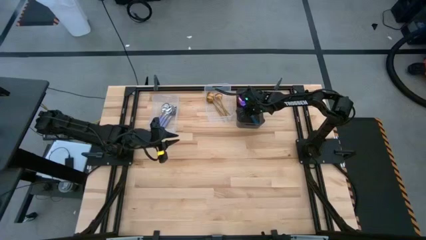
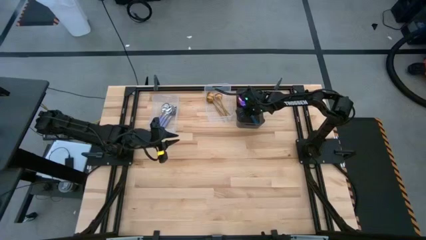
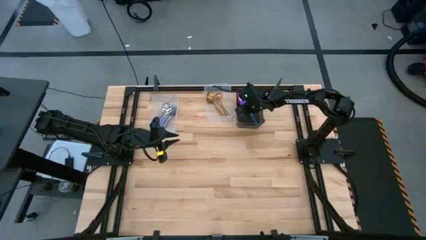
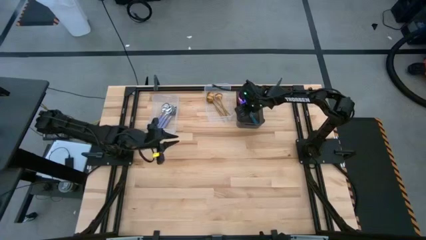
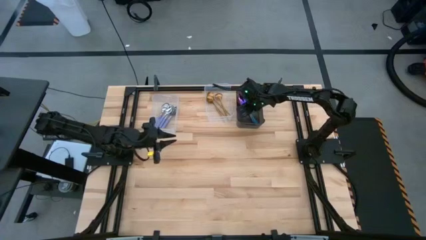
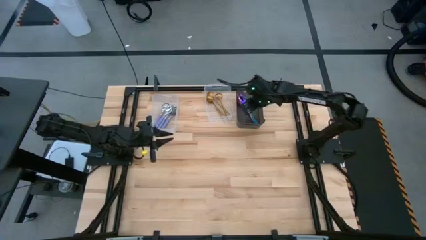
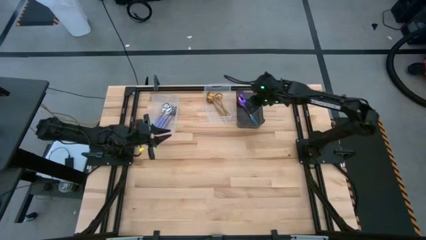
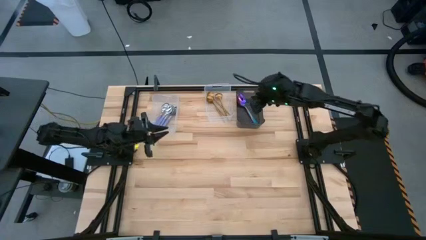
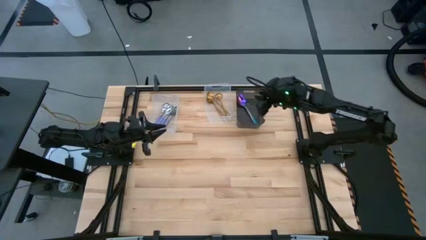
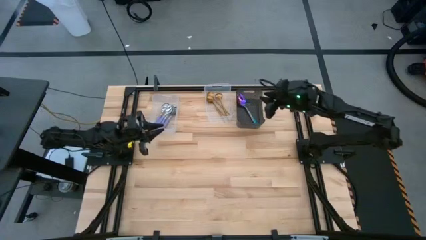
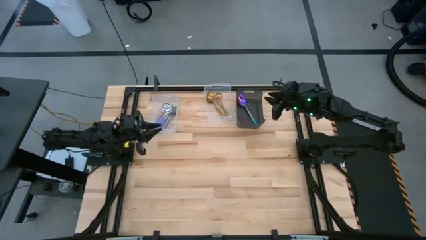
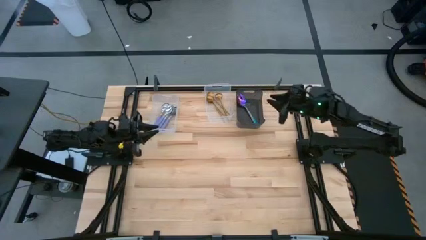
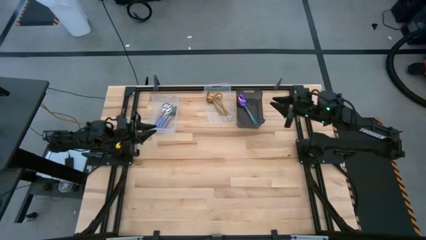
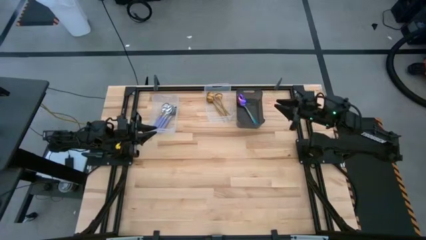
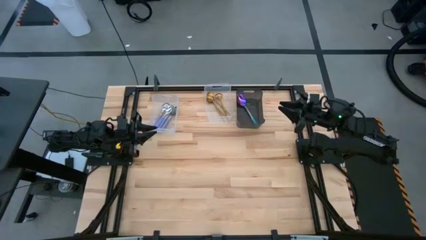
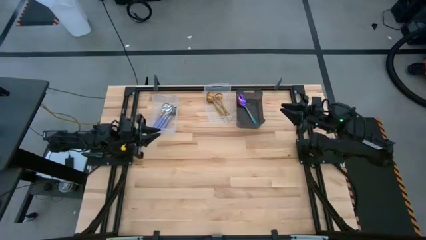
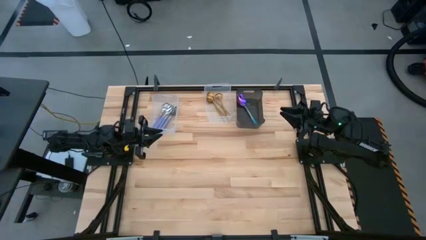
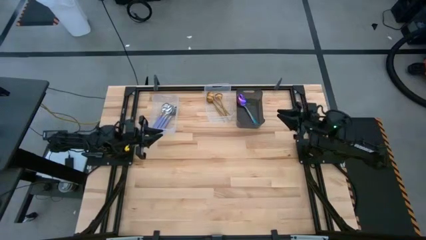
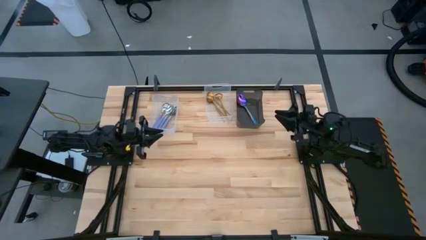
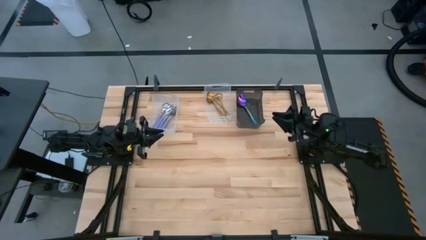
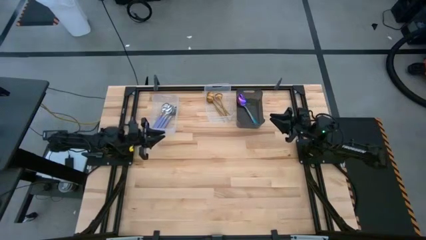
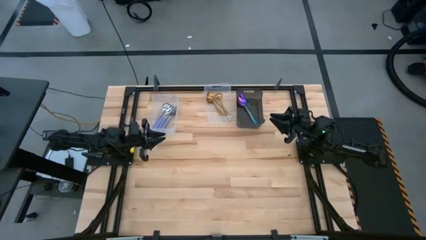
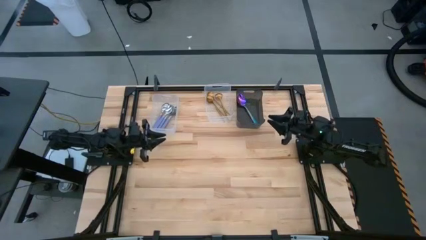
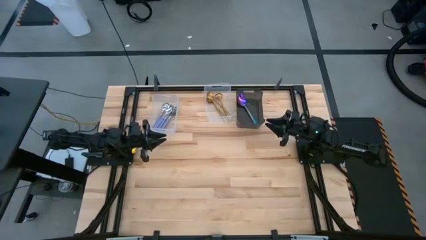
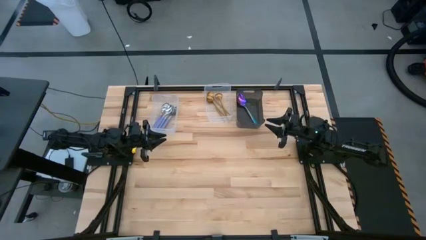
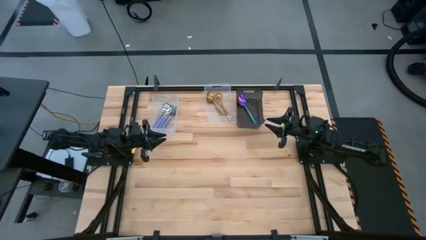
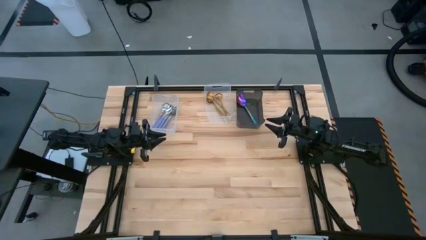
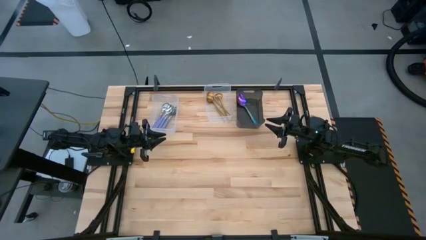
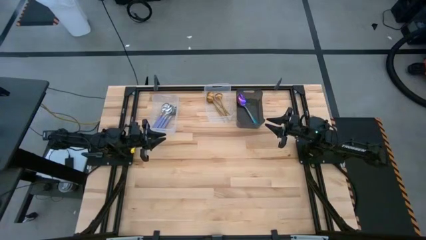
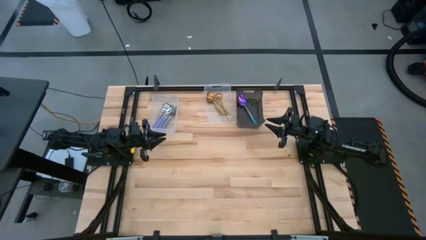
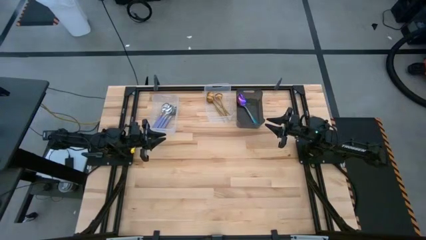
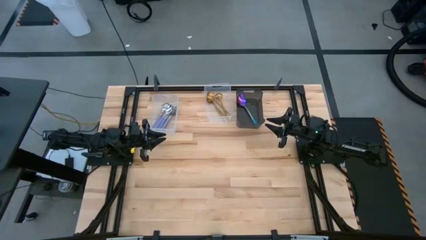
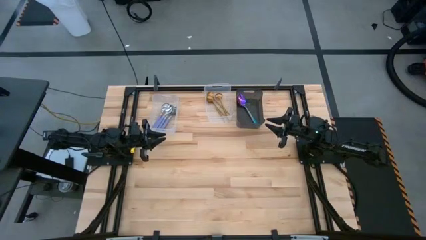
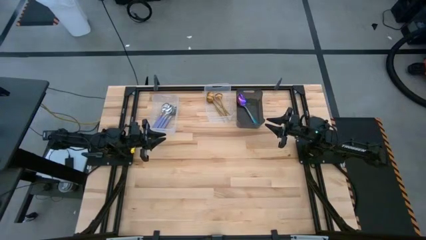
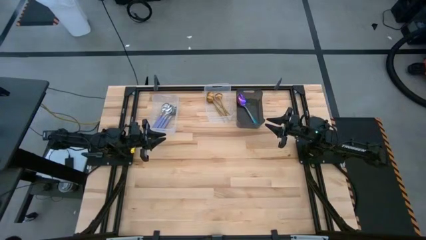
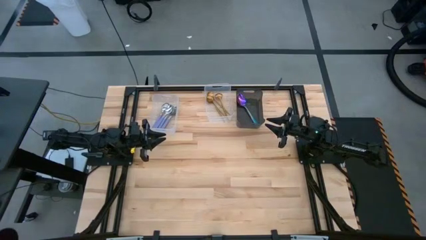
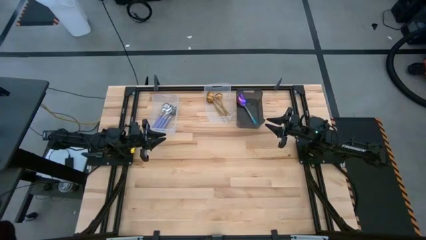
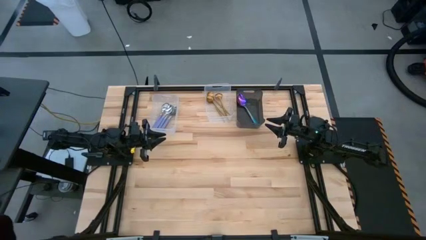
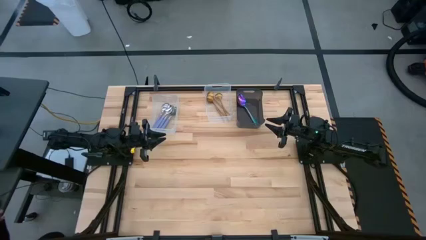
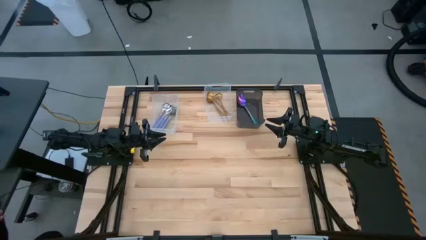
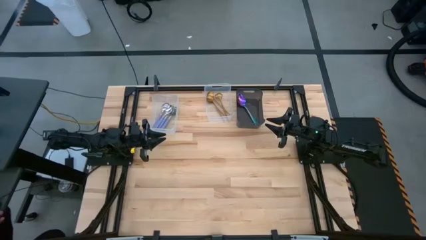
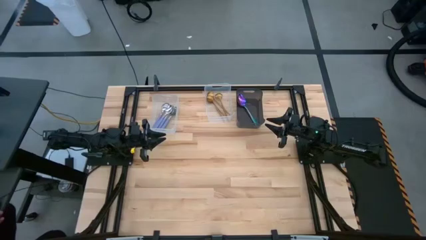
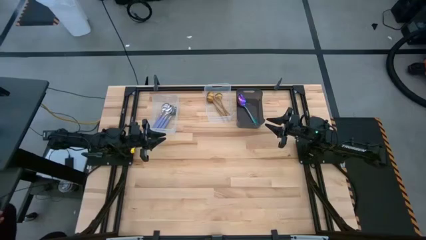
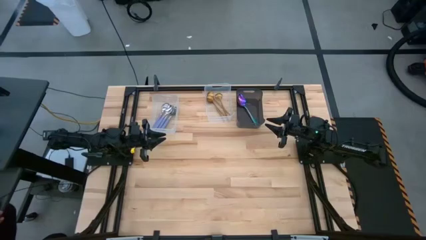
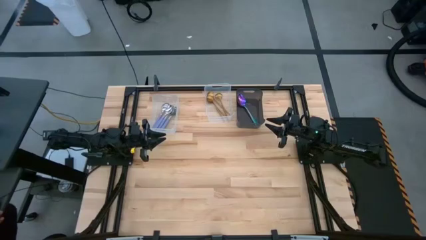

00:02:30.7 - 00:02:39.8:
Task: Sort silverware by color (type)
Return to Home Position

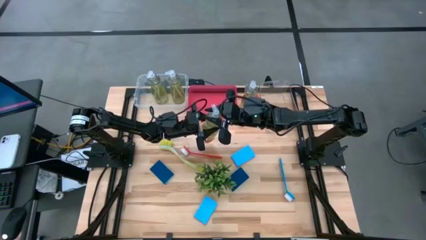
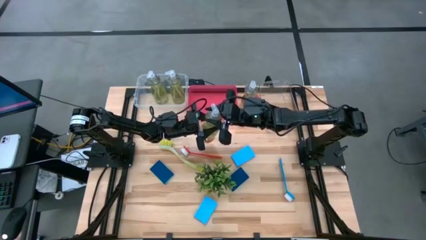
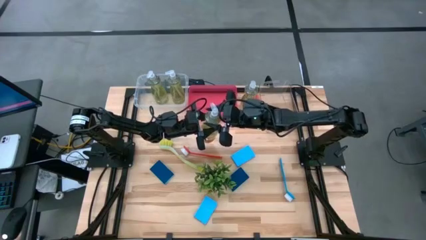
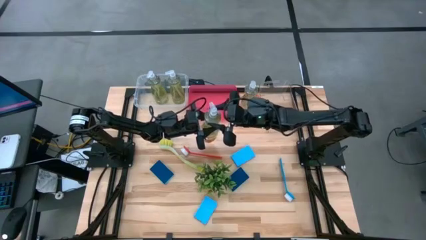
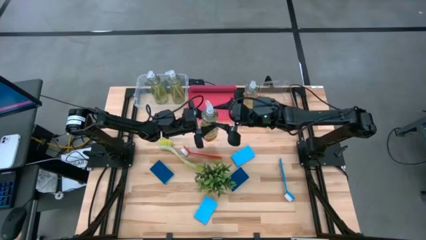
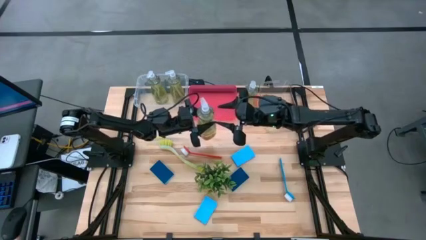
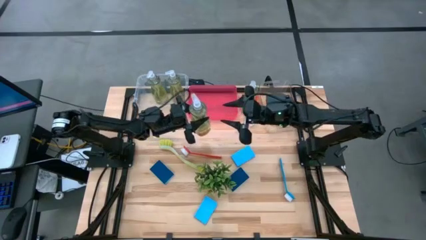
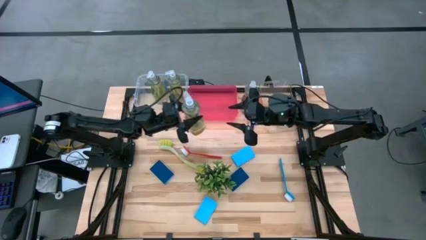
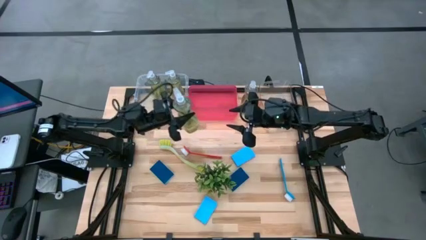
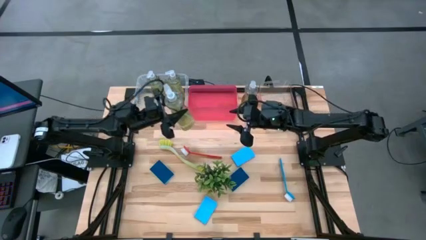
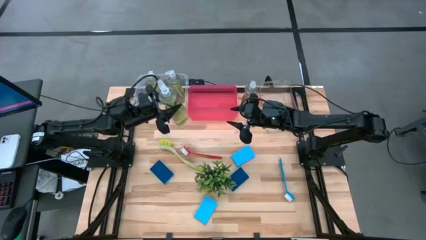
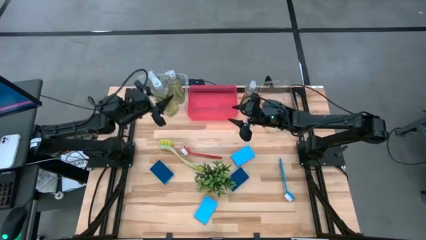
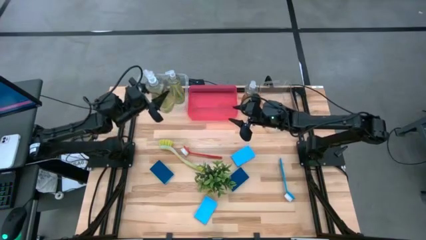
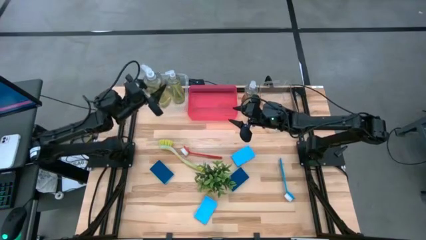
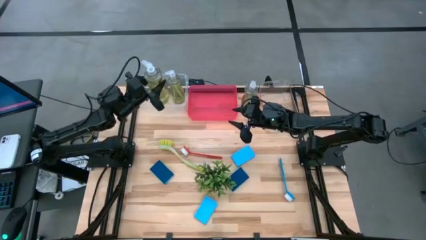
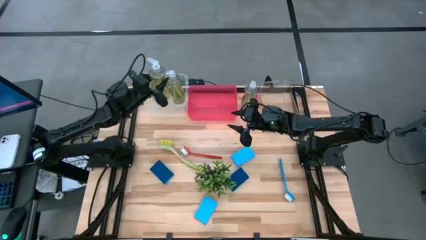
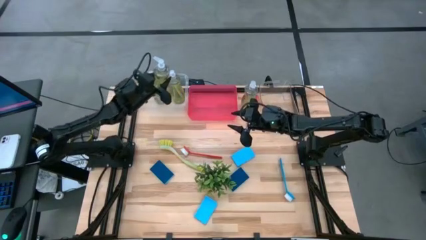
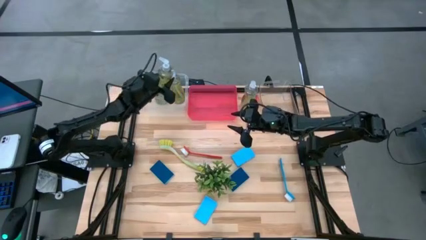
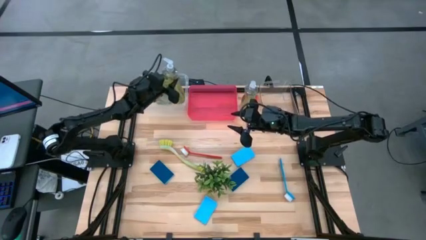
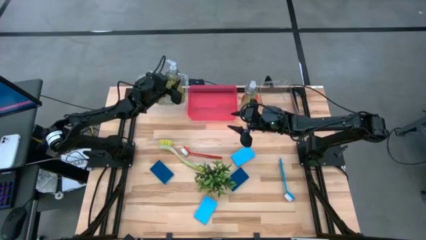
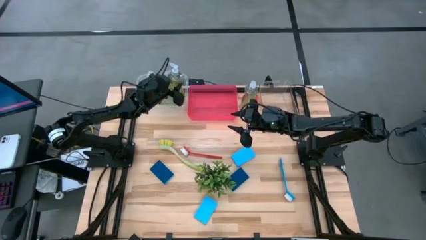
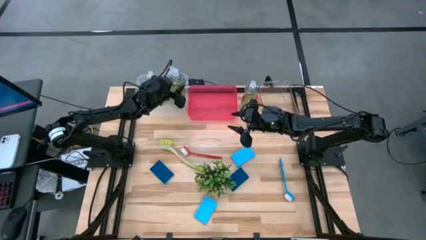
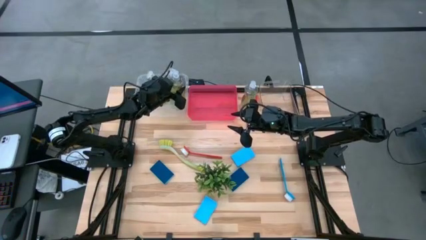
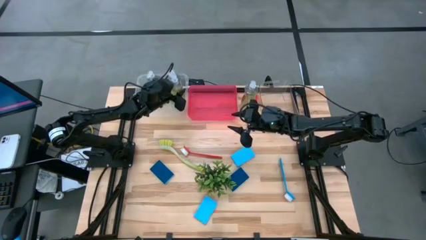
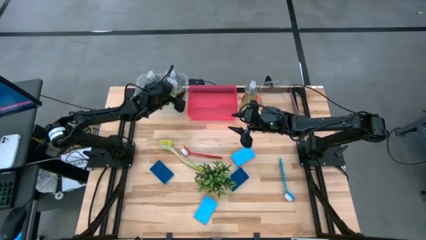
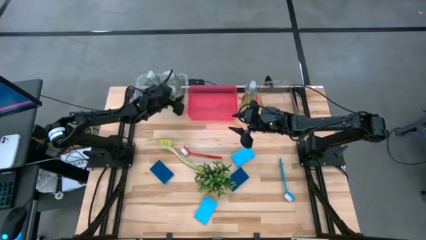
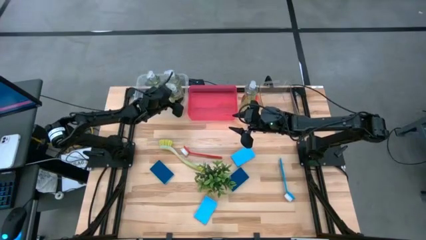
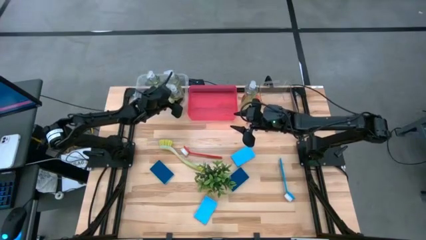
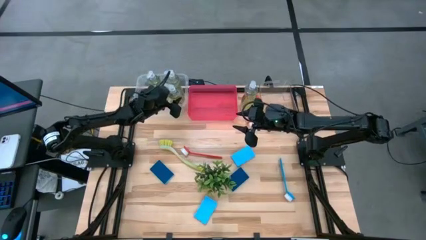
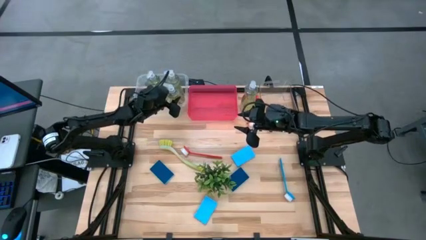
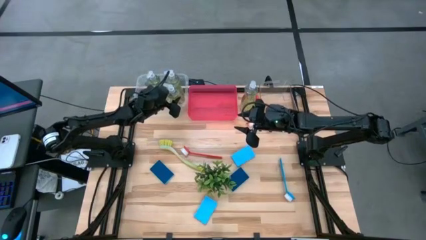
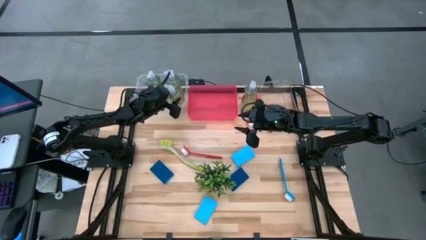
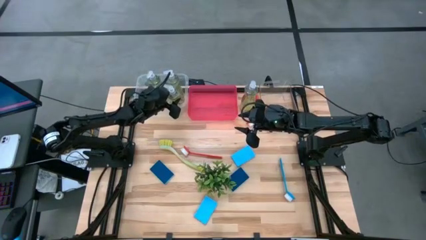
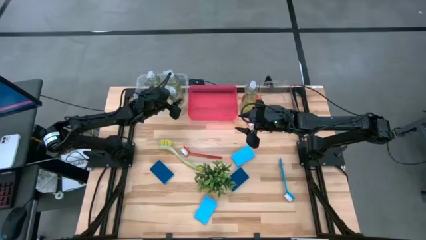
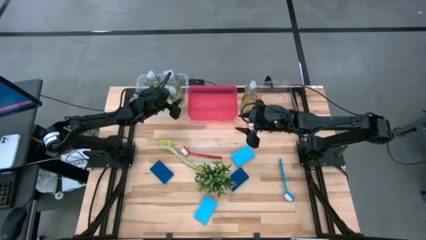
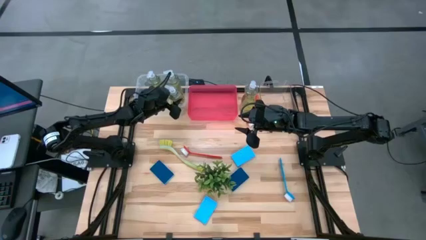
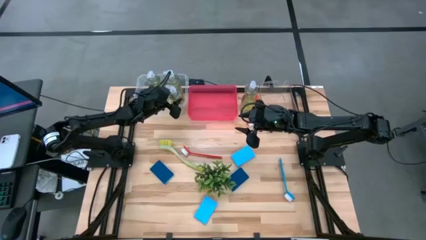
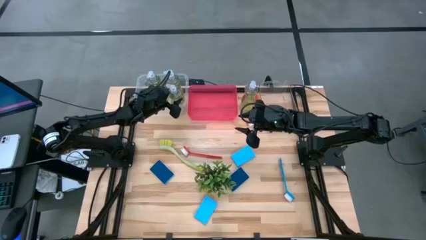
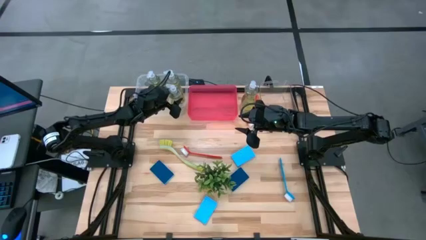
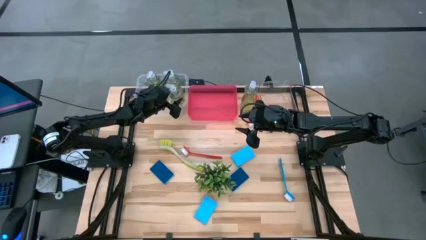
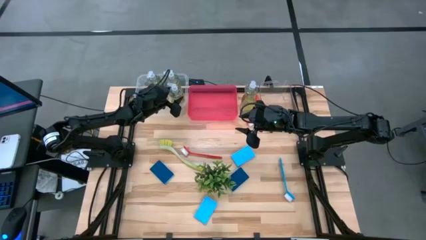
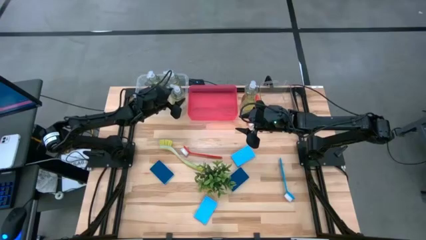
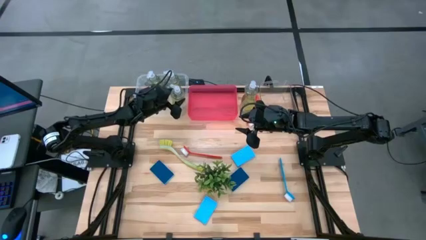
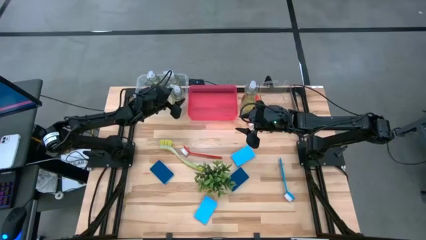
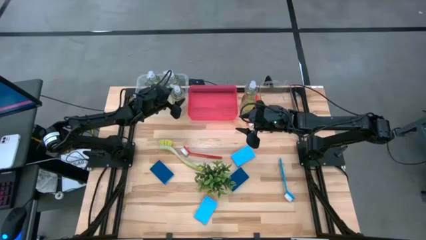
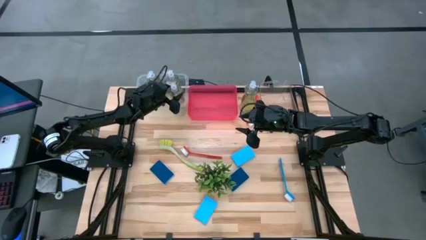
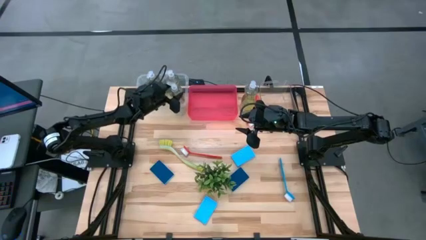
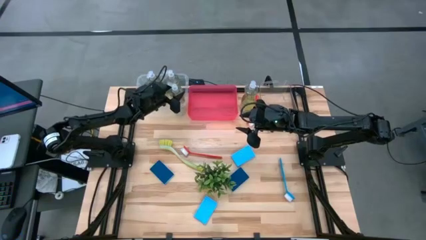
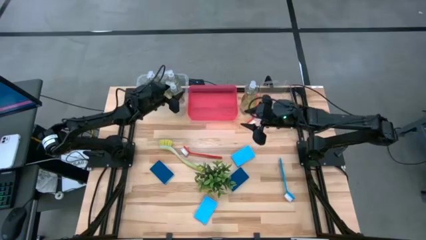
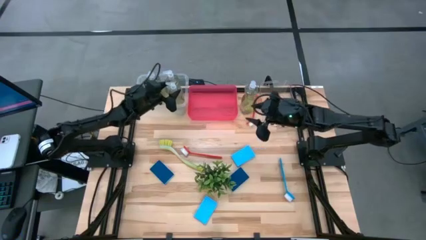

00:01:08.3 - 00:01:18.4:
Task: Pick & Place Kitchen Sink Supplies
Put the yellow dishwashing liquid into the white bin
